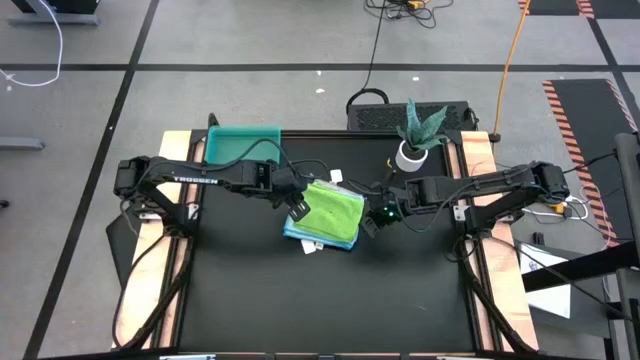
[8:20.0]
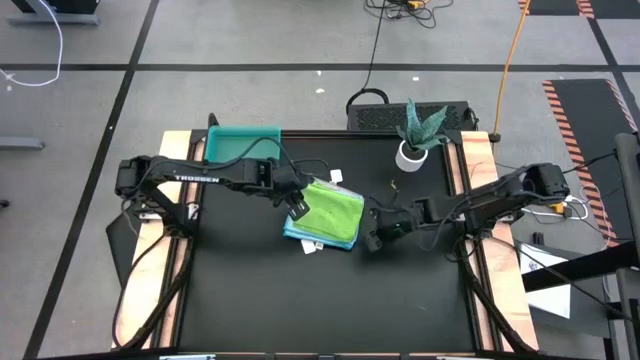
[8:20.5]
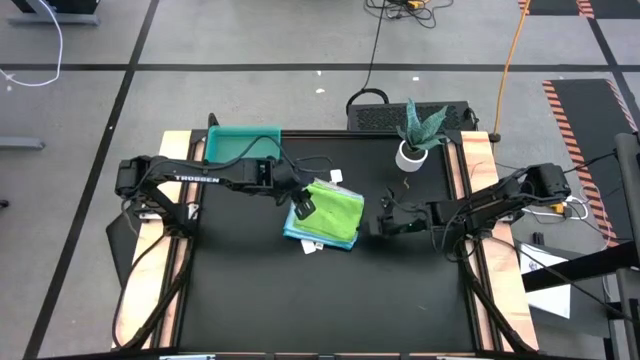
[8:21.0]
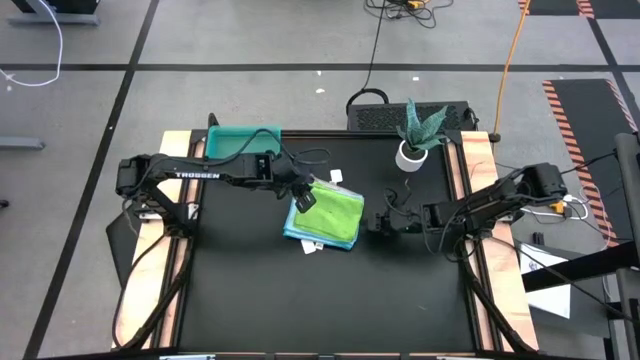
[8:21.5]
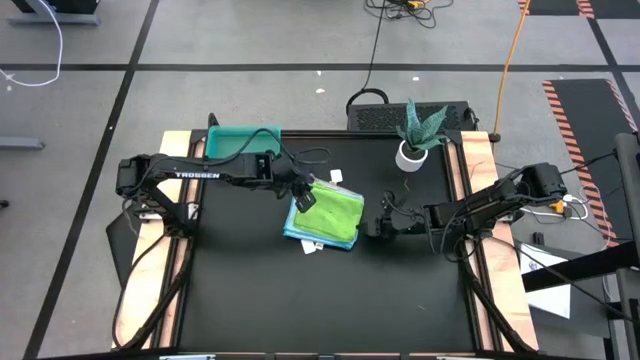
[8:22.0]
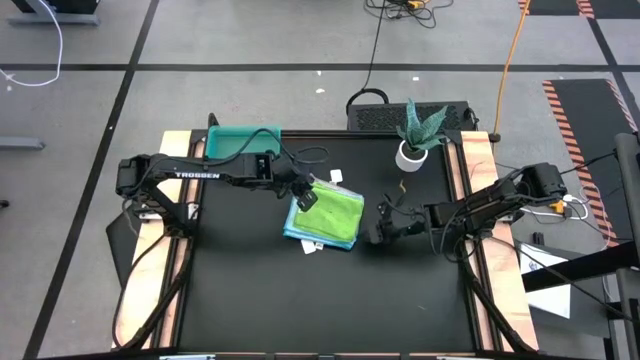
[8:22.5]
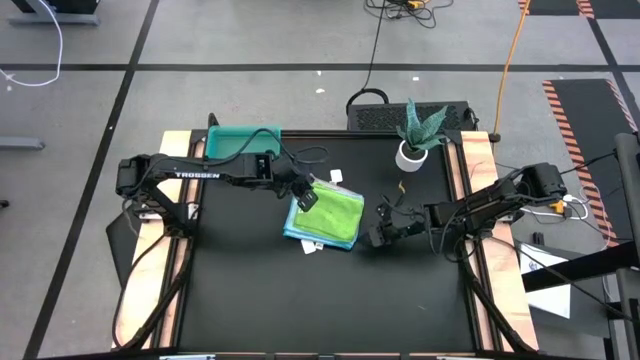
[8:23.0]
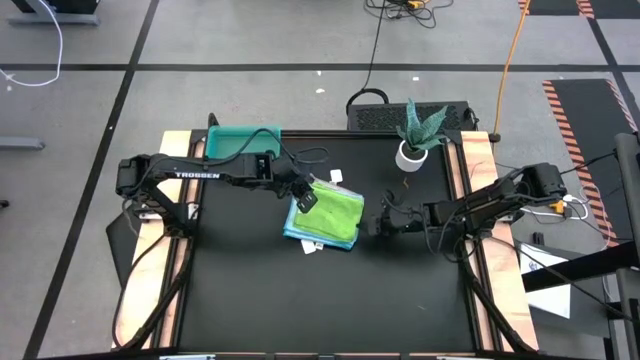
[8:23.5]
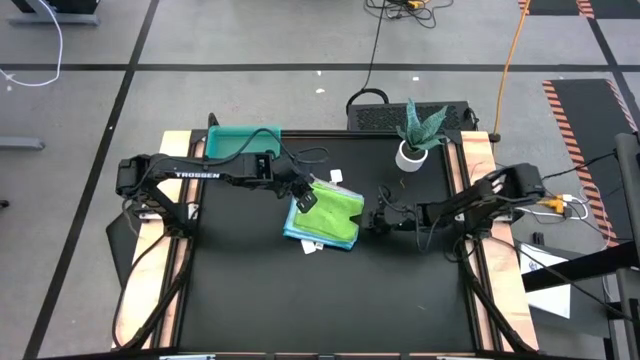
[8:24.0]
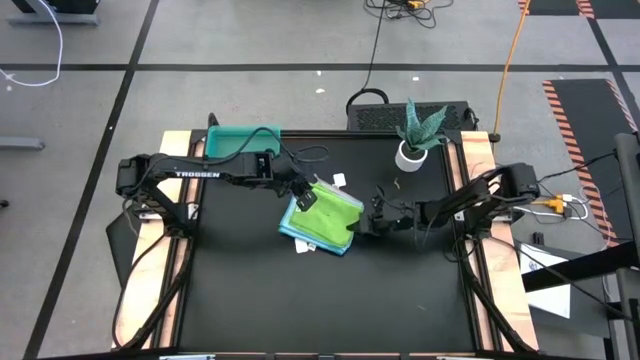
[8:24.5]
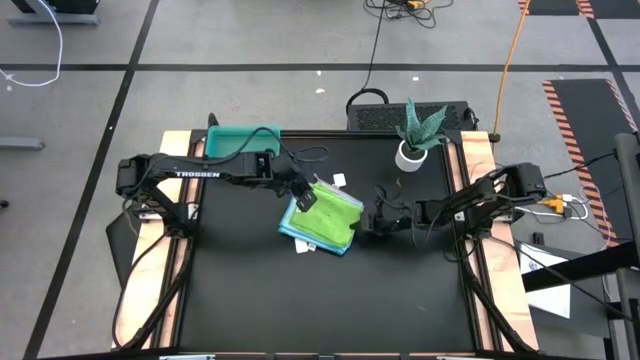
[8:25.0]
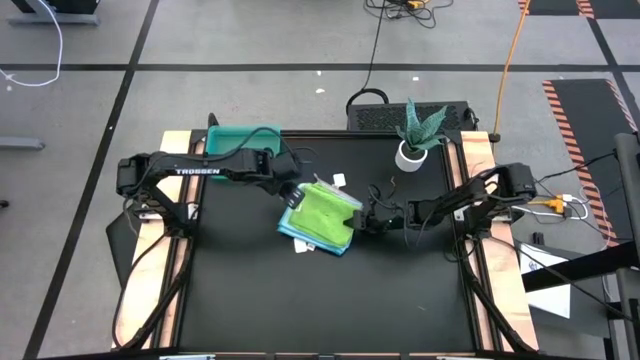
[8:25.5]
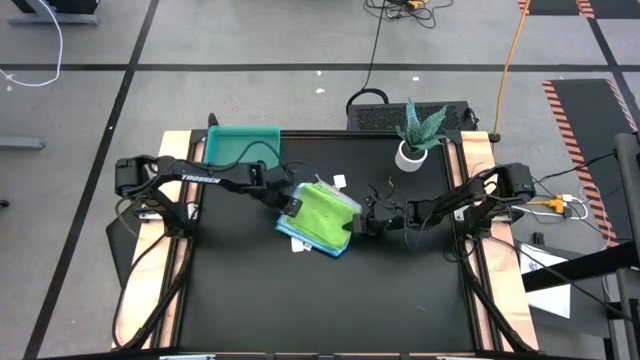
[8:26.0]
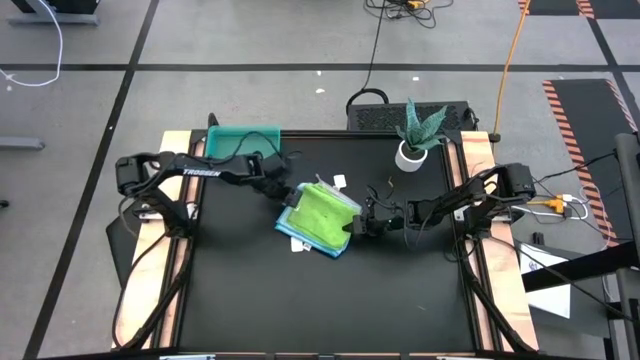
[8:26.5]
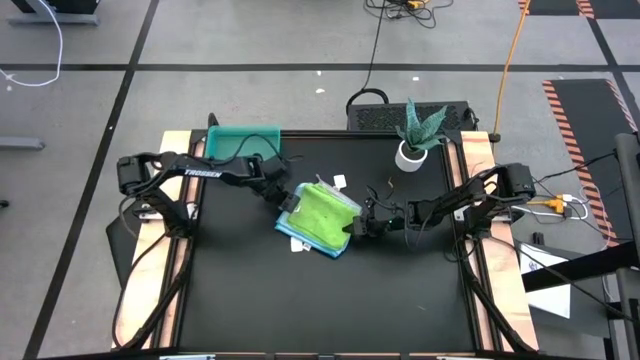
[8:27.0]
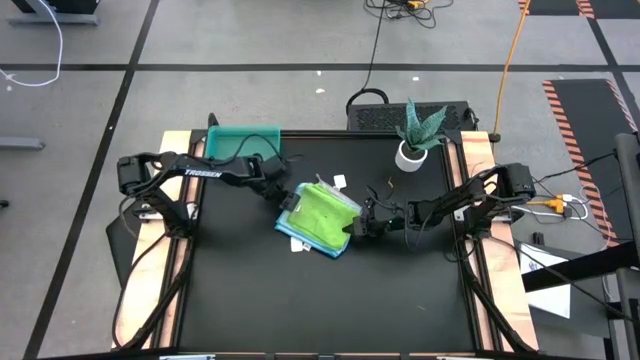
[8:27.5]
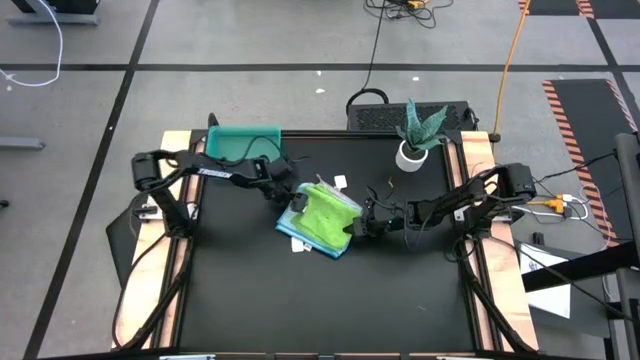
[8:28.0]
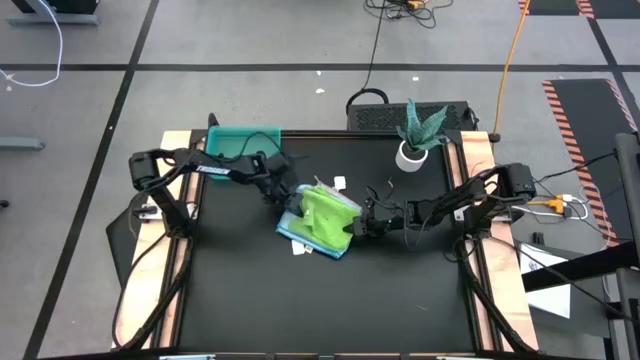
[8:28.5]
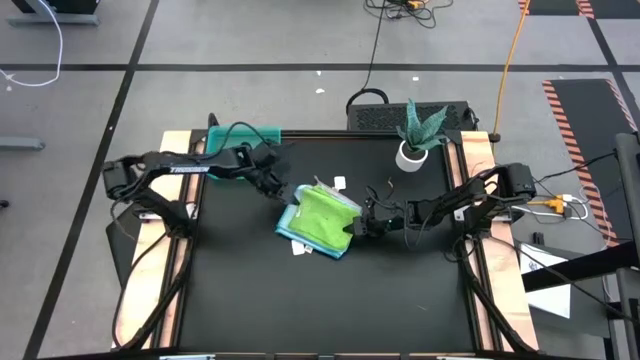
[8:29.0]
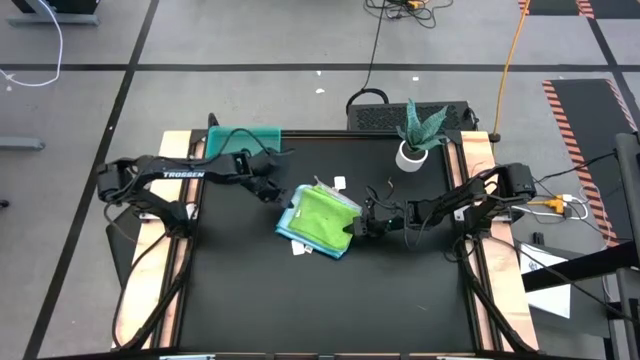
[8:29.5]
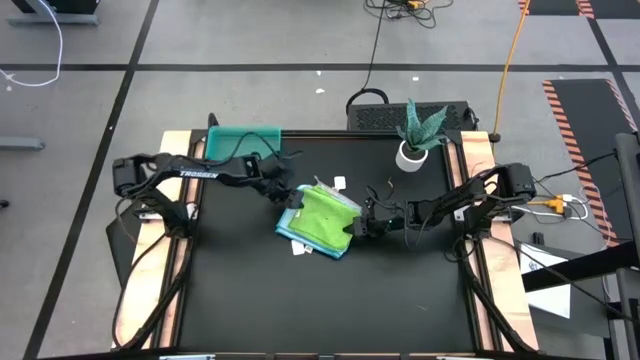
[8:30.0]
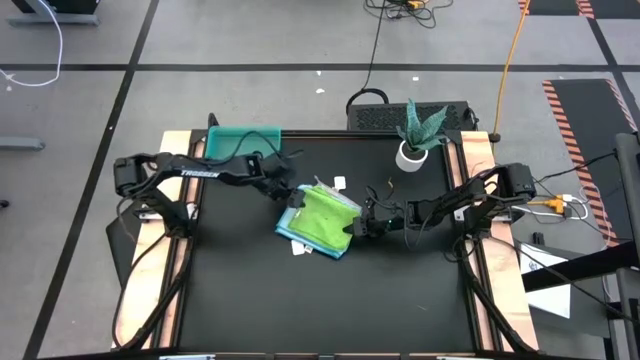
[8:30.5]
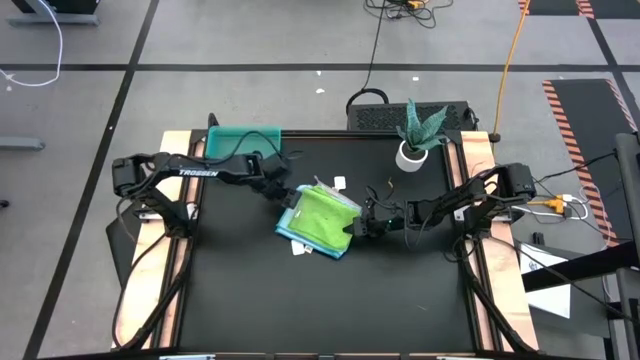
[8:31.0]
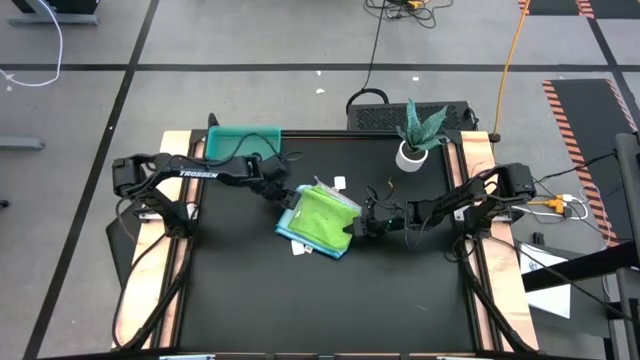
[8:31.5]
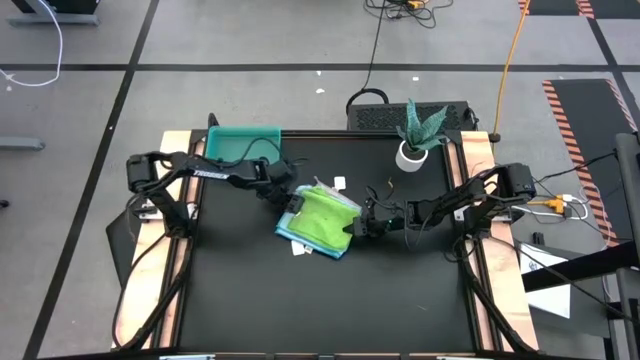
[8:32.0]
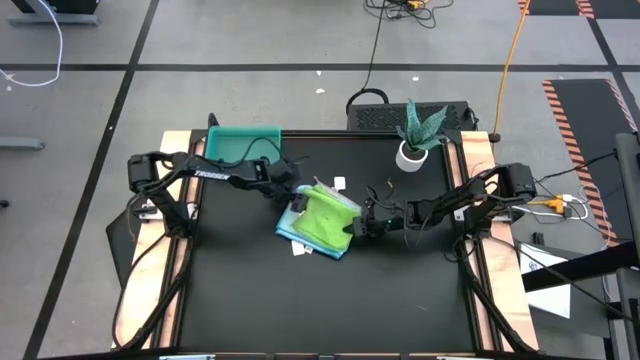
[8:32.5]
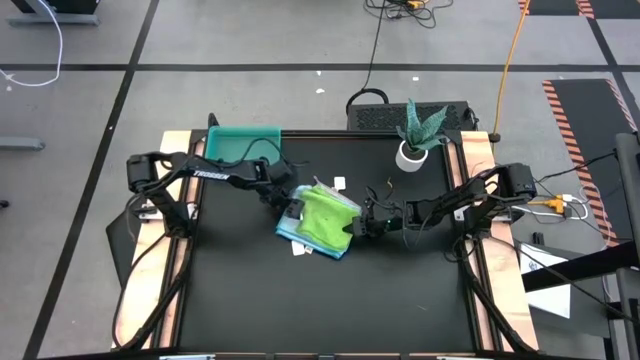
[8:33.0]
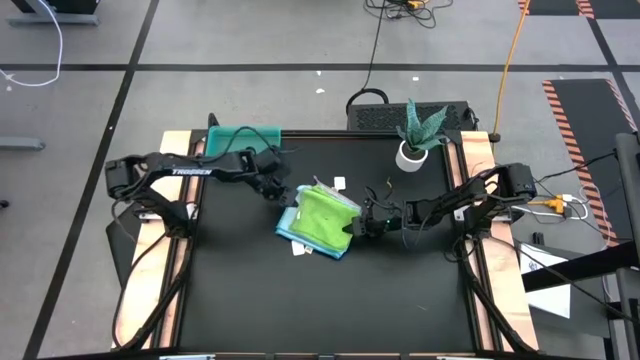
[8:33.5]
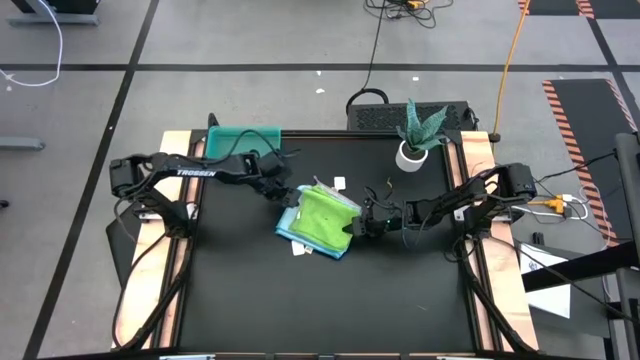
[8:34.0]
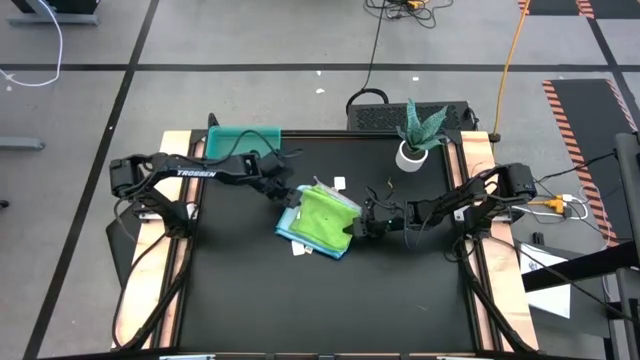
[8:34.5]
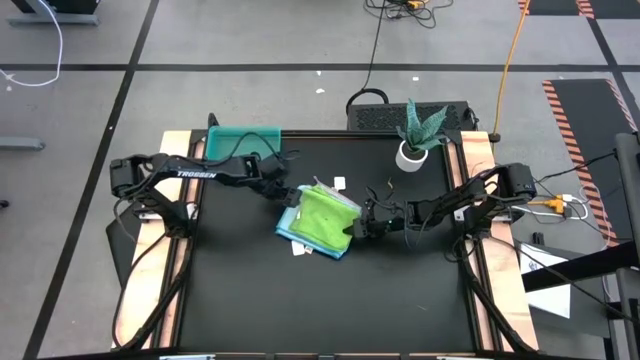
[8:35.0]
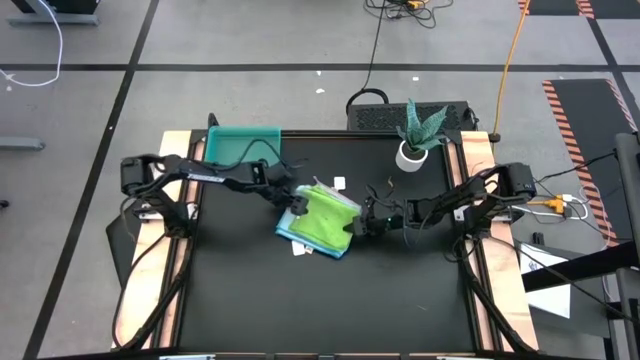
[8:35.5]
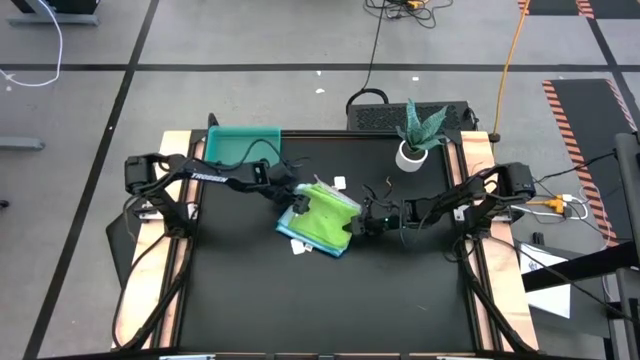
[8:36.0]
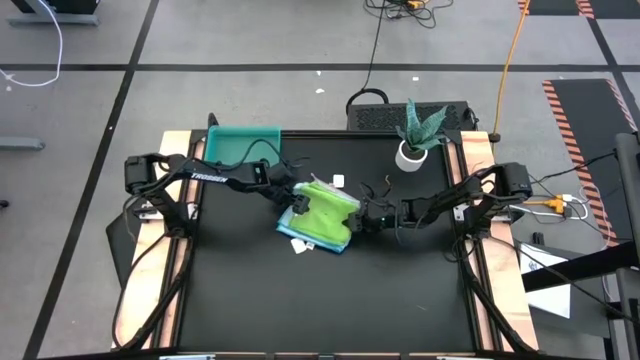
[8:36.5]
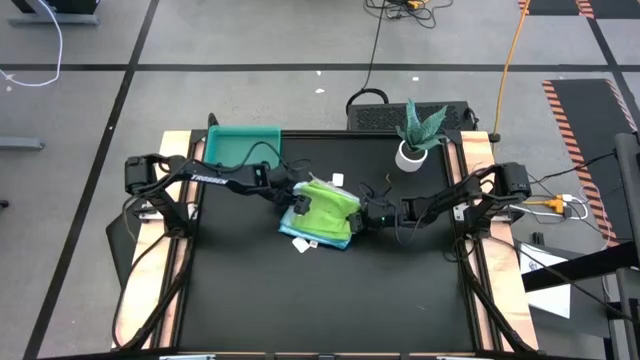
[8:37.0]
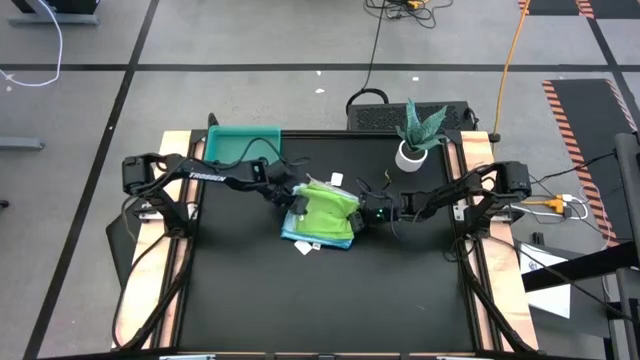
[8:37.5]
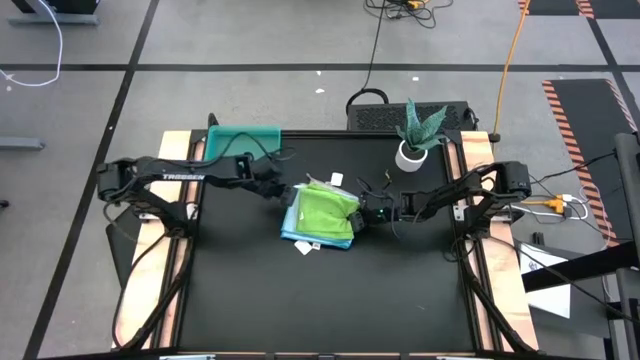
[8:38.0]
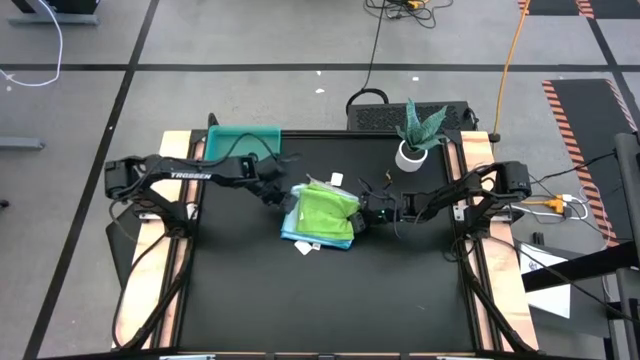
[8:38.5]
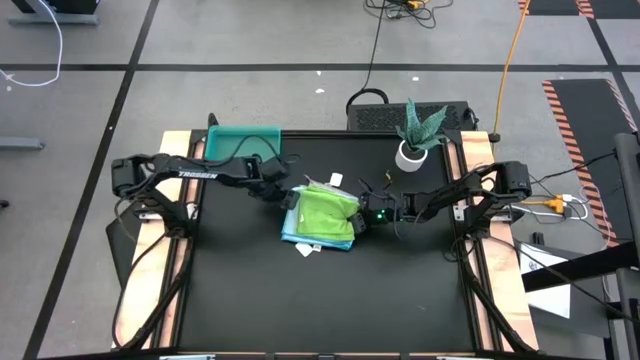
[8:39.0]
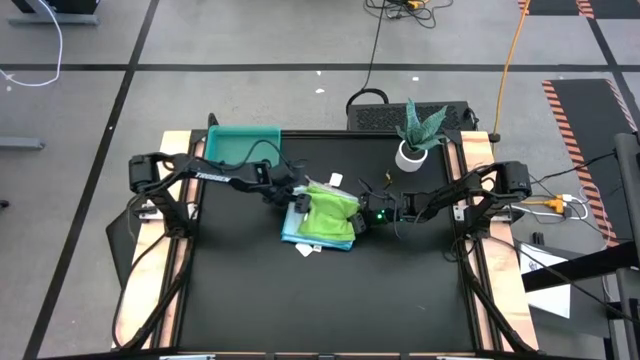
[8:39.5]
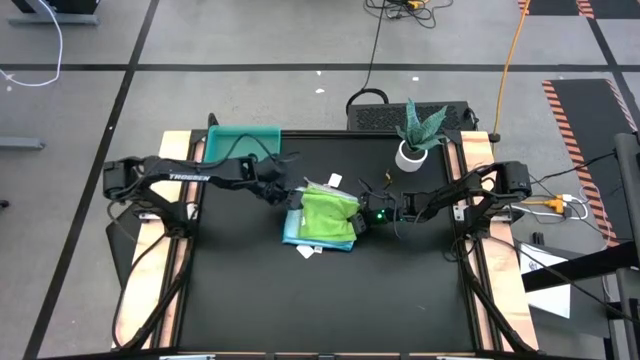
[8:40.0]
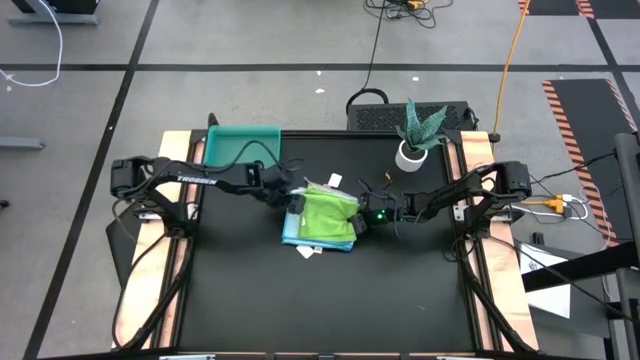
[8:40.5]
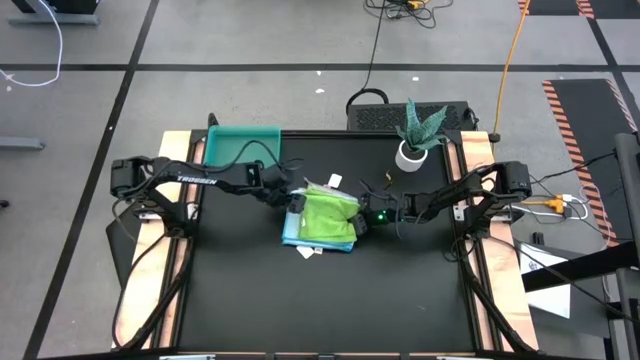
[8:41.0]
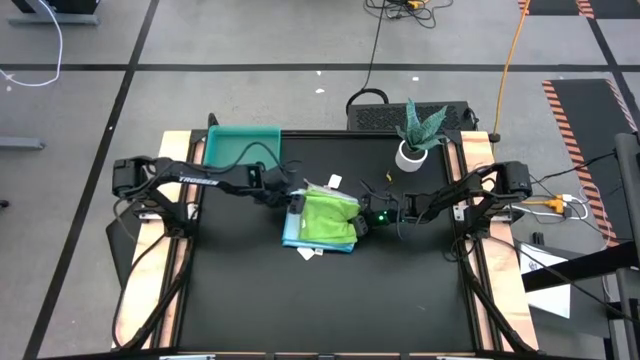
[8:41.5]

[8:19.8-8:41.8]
Task: Fold microfiber towels
Put the stack of folded microfiber towels in the blue bin
